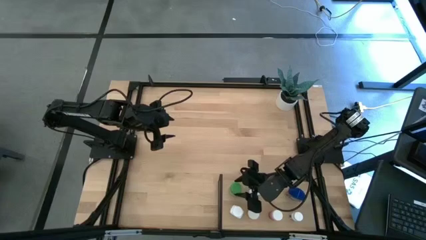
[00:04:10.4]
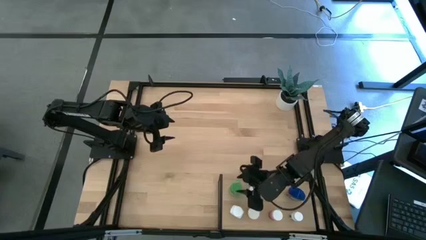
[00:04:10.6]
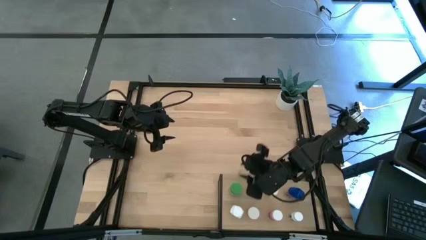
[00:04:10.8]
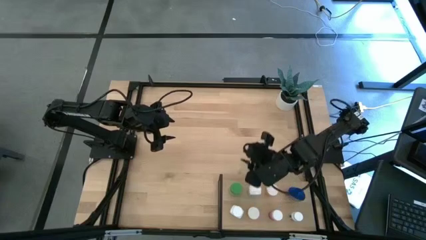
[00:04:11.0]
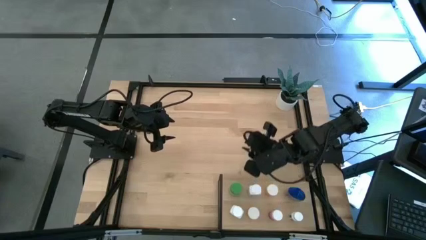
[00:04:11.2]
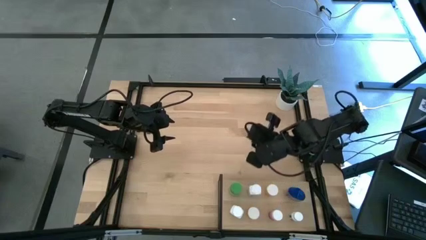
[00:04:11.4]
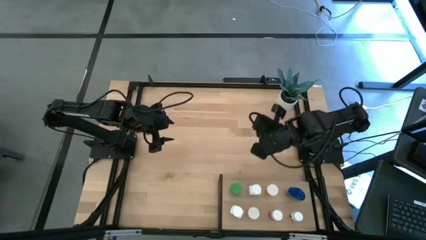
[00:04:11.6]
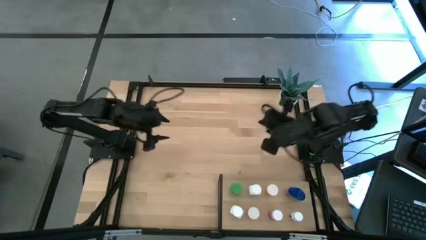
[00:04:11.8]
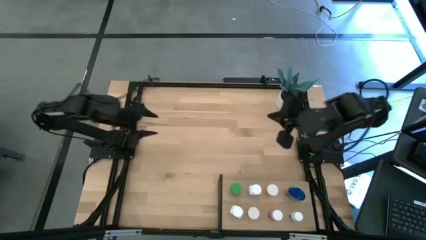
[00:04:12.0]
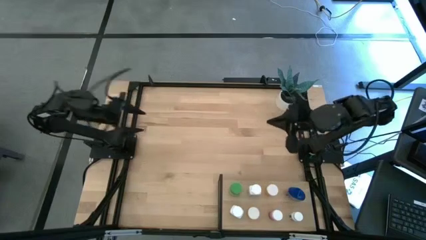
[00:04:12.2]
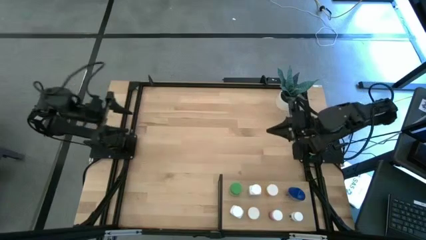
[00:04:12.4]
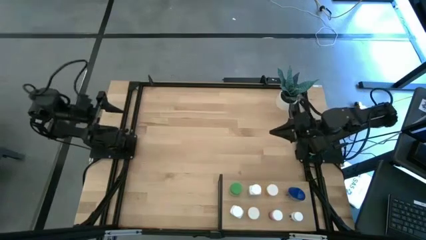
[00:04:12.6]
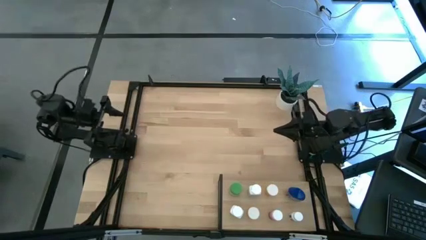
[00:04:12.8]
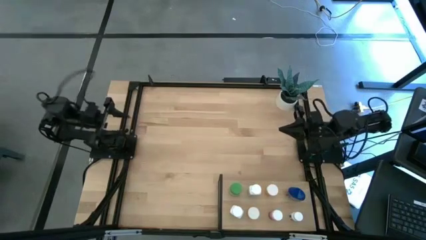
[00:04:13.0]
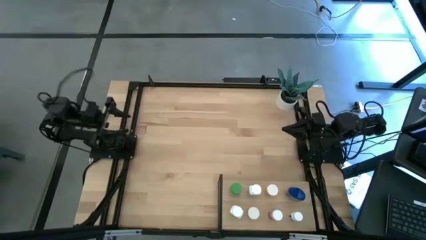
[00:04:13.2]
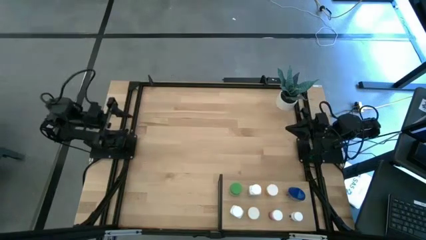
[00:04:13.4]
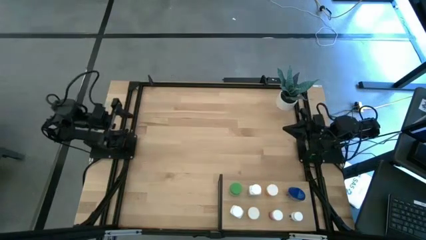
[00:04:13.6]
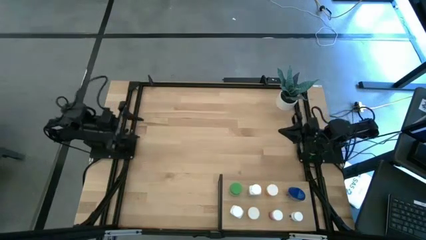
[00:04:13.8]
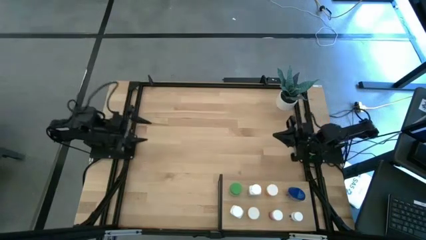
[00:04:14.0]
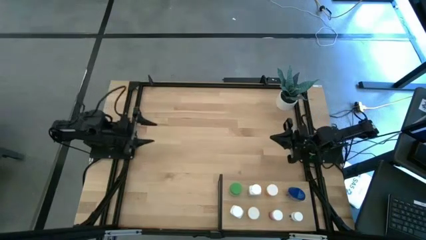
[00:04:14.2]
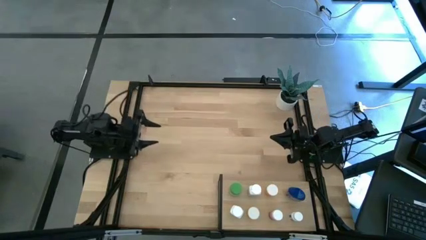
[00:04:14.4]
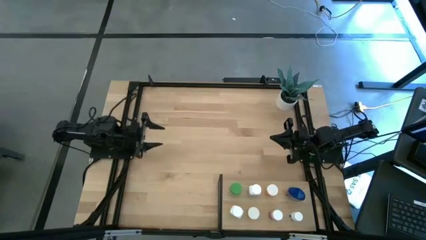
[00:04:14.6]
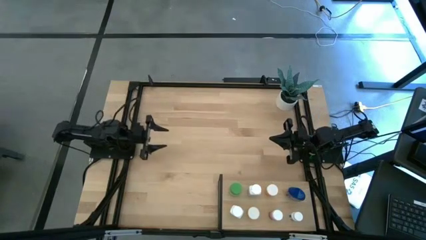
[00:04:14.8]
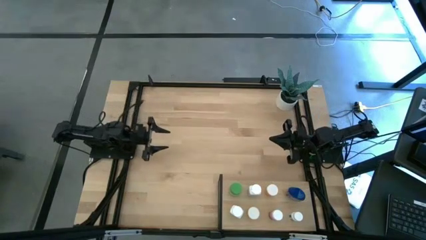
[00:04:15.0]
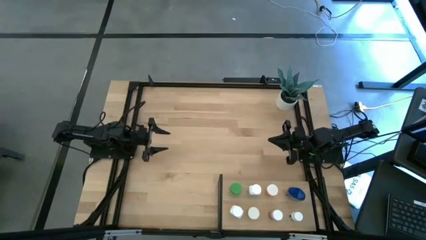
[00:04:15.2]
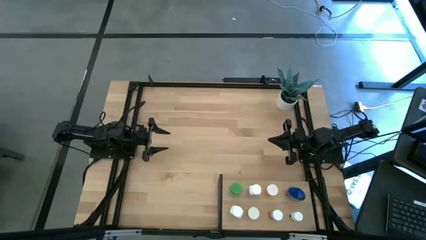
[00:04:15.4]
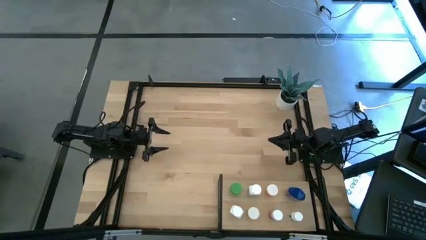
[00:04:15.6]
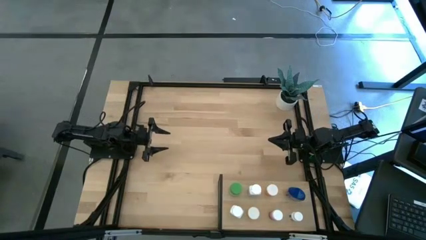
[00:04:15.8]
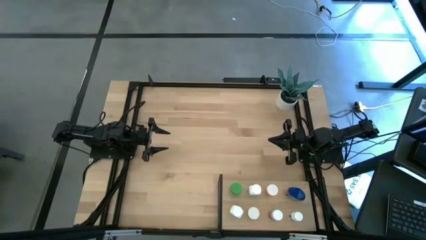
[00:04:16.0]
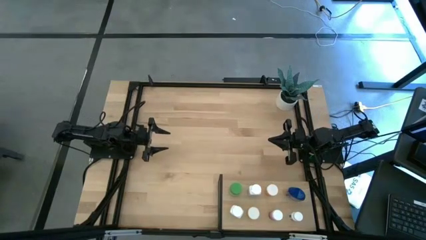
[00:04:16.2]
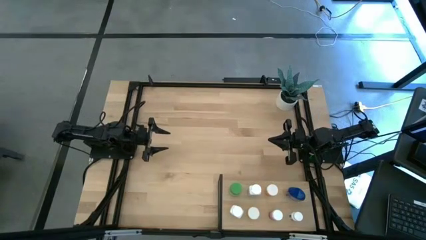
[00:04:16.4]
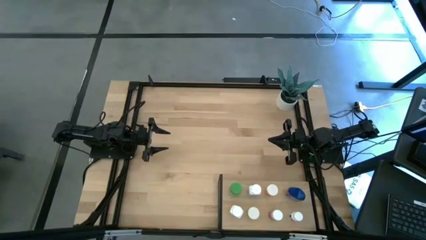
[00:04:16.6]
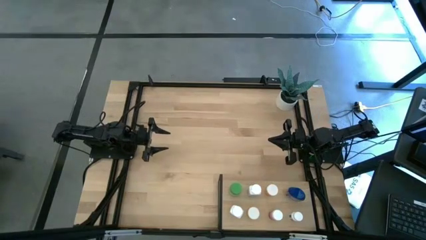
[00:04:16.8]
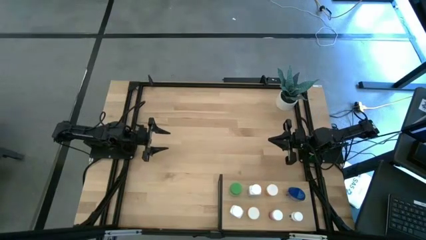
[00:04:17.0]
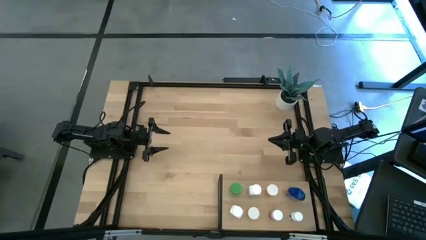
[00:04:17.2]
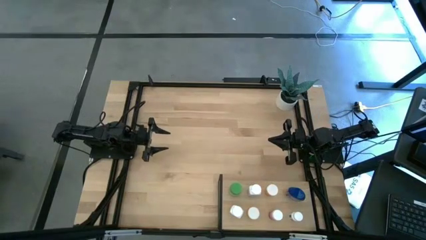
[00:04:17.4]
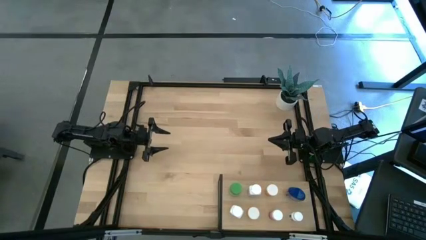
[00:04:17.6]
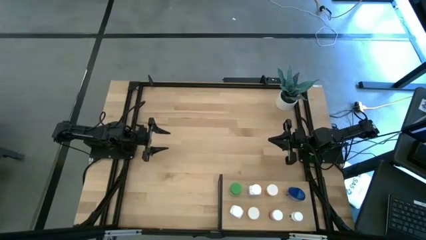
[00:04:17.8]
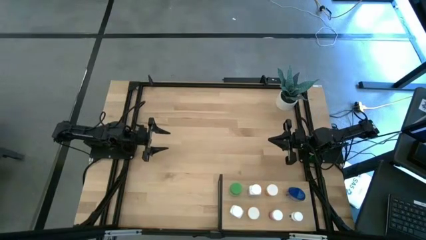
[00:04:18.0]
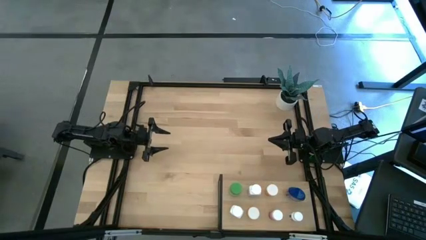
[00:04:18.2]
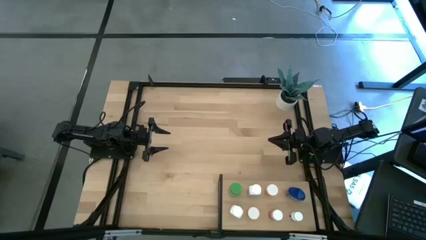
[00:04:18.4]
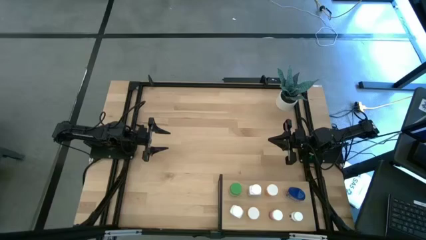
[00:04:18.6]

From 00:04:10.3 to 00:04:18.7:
Task: Pick and place medicine bottles onto shelf by color
Return to Home Position

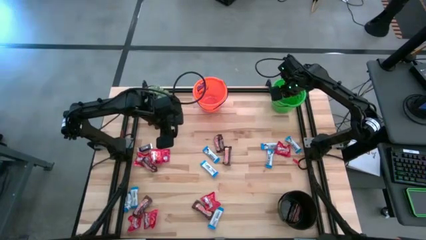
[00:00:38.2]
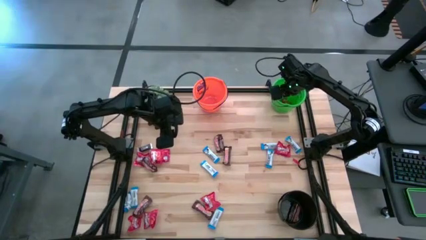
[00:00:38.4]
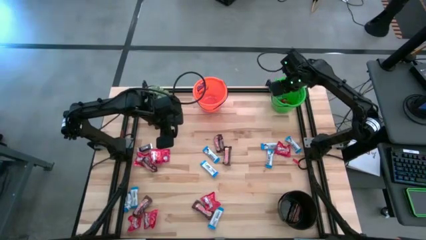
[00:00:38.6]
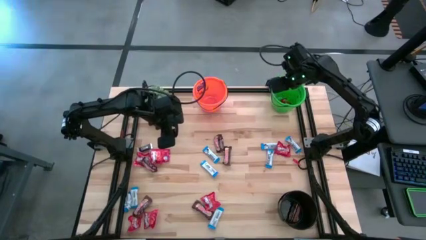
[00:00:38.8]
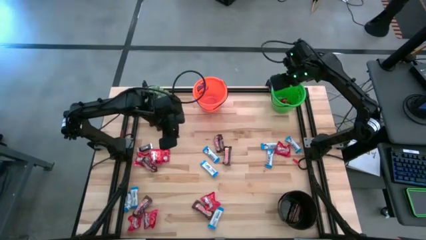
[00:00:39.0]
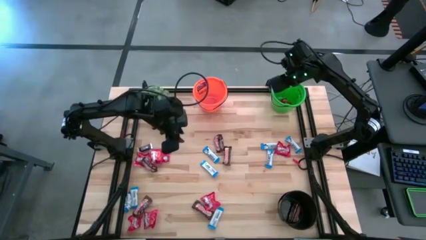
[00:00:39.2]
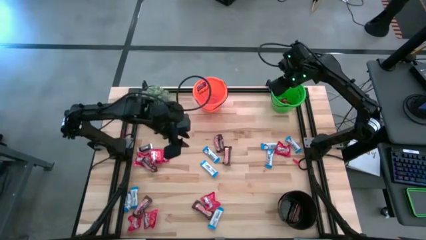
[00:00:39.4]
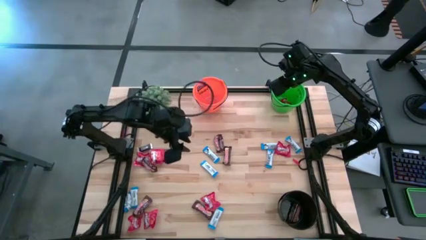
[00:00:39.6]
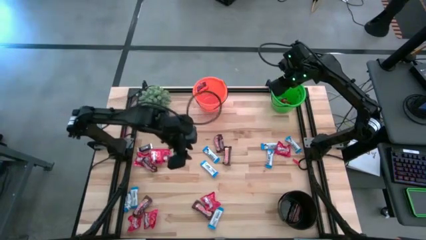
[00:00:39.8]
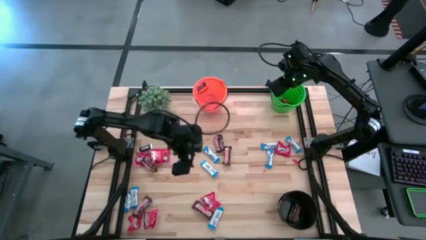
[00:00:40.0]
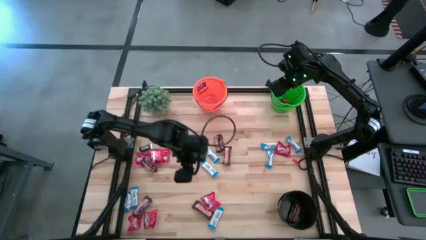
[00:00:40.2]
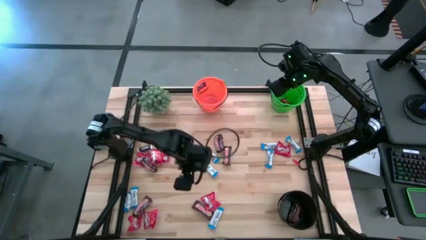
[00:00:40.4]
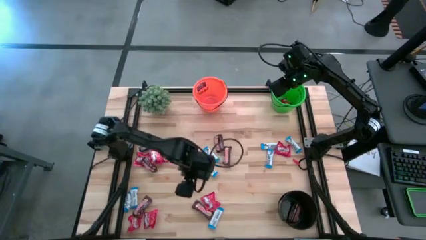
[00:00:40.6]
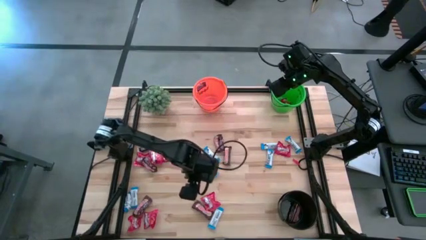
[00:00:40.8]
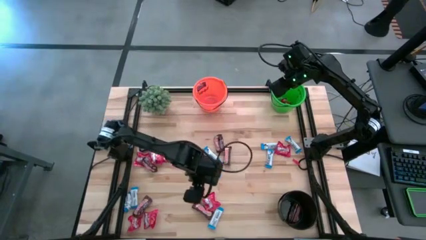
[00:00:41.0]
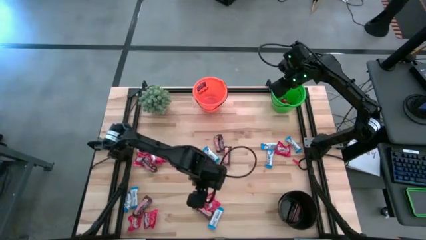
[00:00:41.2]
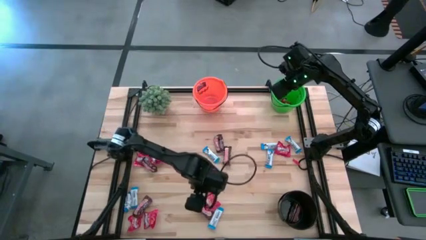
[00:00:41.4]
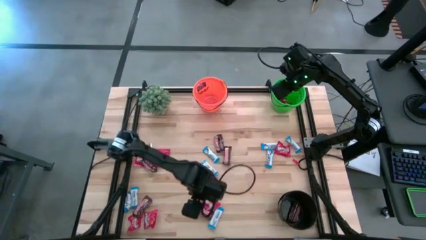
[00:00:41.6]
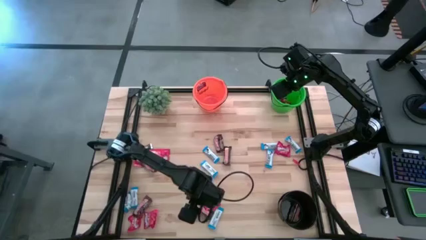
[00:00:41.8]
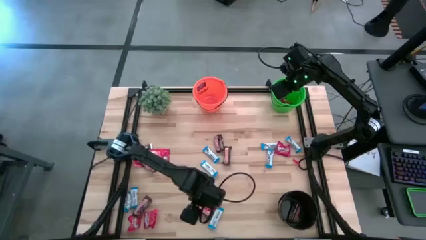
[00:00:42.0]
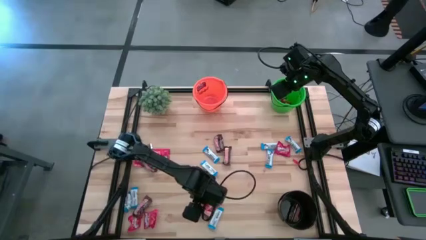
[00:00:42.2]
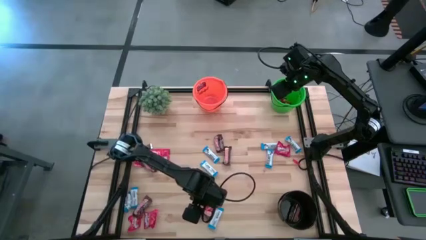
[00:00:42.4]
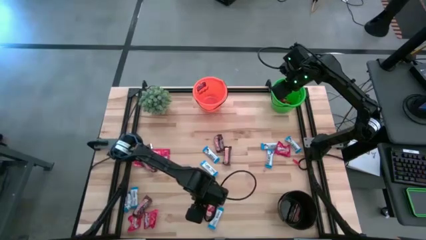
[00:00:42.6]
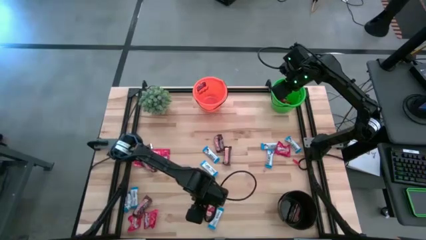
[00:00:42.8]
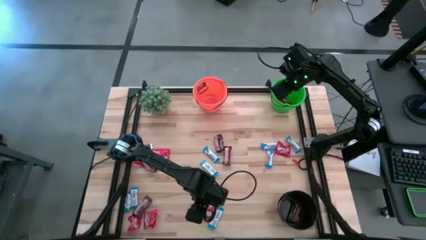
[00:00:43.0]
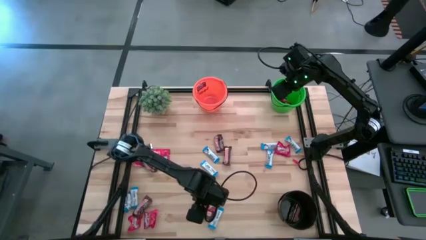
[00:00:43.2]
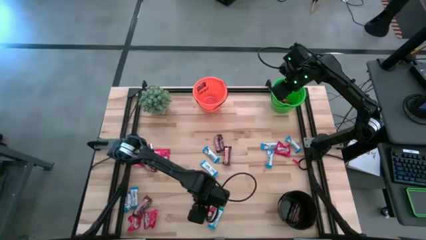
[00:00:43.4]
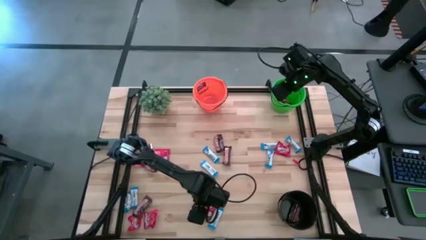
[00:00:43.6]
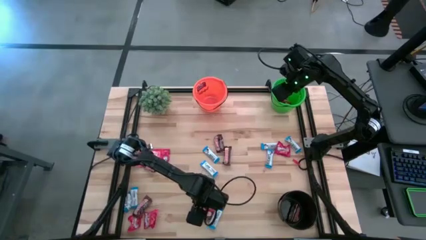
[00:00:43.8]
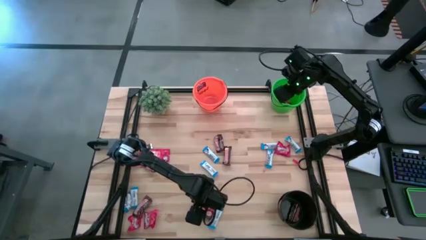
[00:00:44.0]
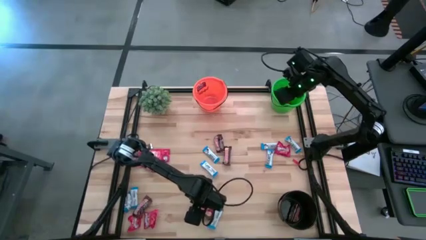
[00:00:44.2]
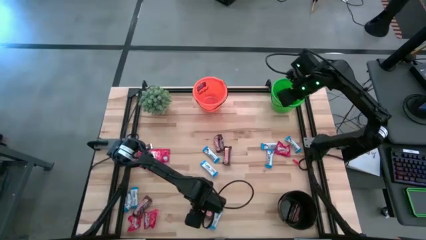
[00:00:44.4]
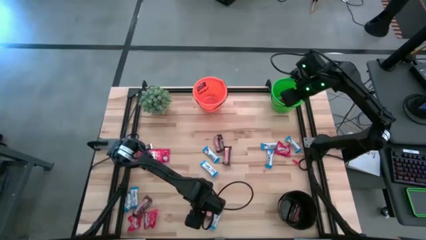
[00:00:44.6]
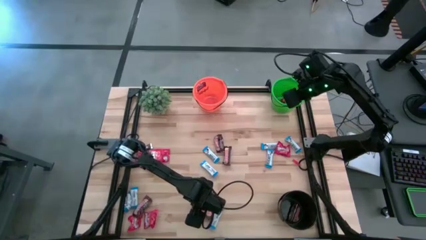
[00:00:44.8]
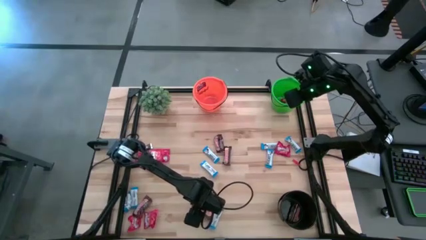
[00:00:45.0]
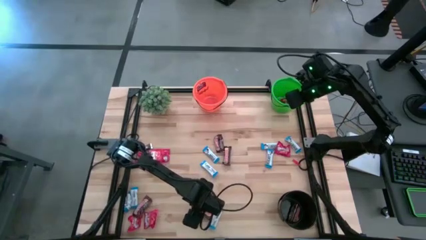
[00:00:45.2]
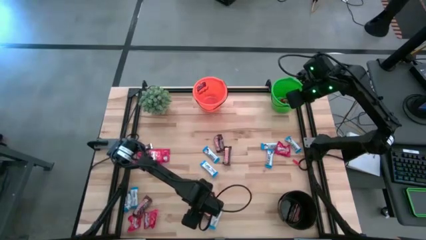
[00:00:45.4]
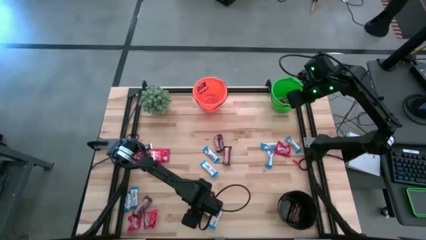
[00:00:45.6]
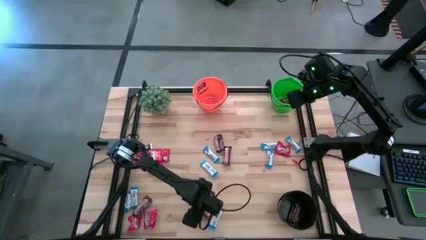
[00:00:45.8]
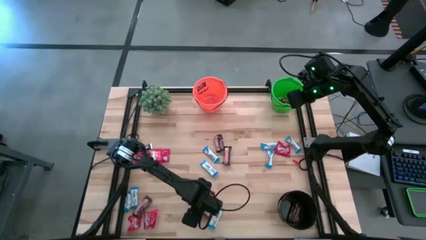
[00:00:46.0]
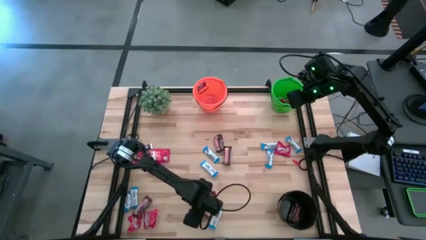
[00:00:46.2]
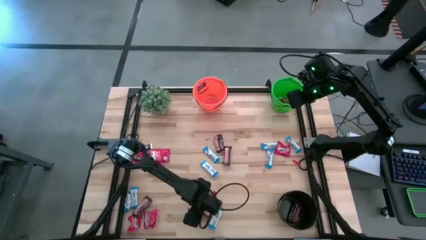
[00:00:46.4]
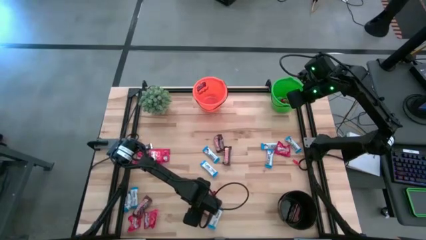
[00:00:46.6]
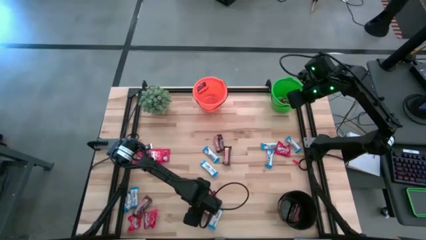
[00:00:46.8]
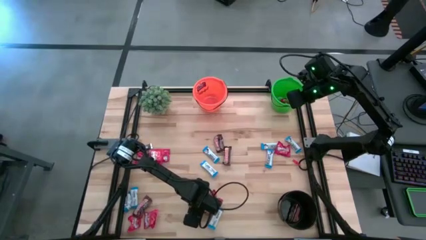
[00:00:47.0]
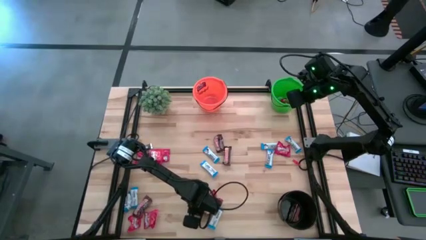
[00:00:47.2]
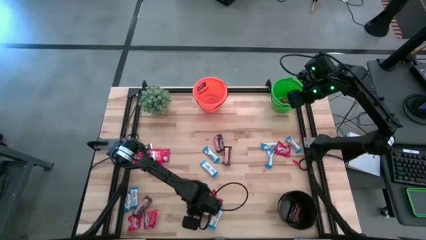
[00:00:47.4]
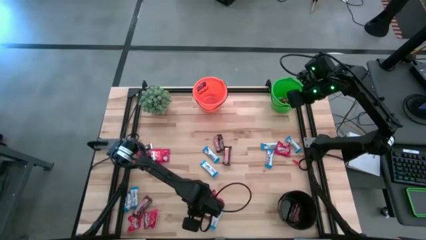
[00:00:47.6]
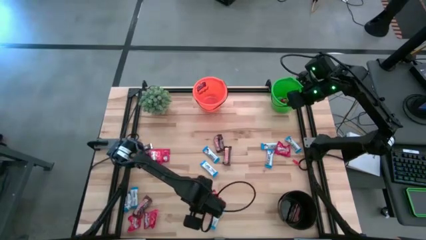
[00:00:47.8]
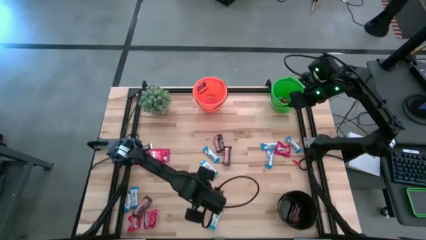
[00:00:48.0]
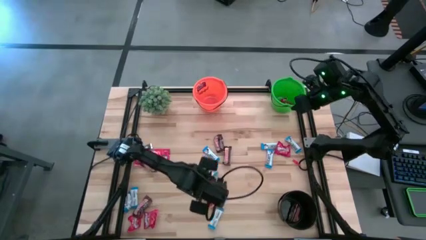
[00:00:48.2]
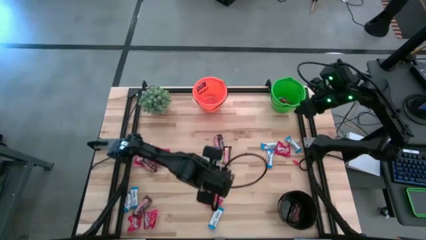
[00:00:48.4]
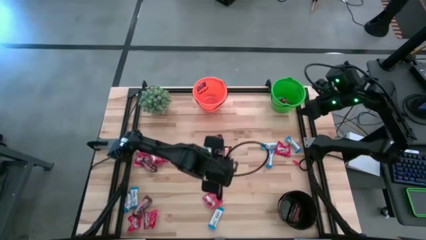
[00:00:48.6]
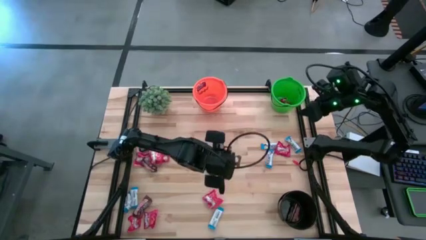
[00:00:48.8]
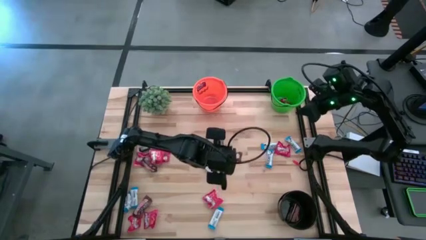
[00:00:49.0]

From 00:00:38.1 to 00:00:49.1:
Task: Organize candy in baskets
Put the brown chocolate bar into the black bucket
